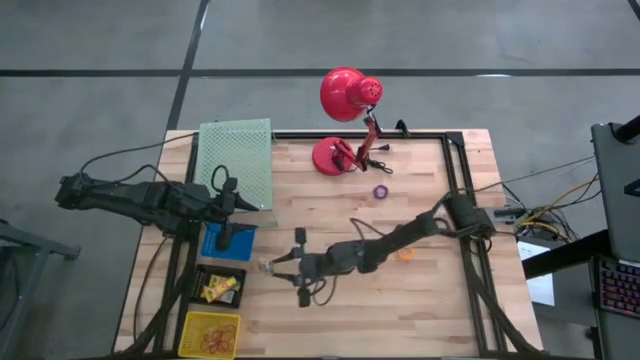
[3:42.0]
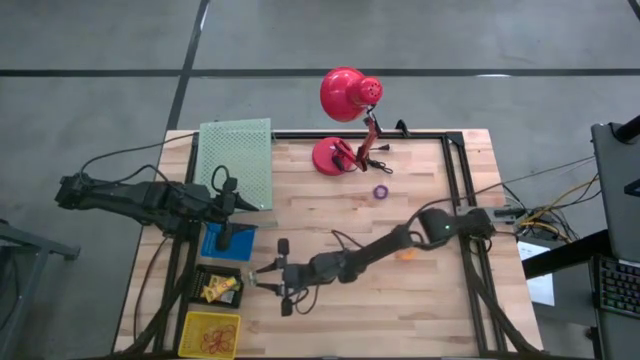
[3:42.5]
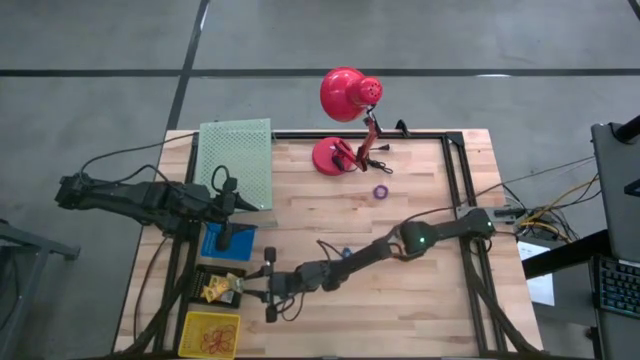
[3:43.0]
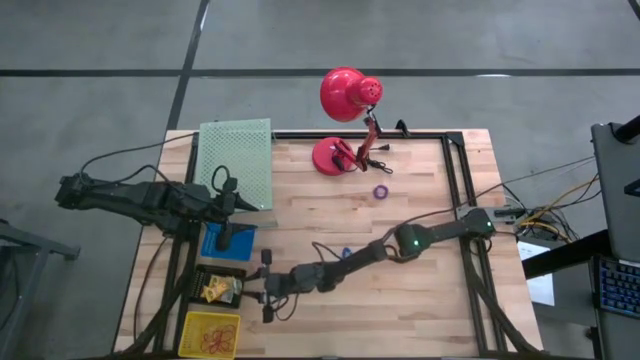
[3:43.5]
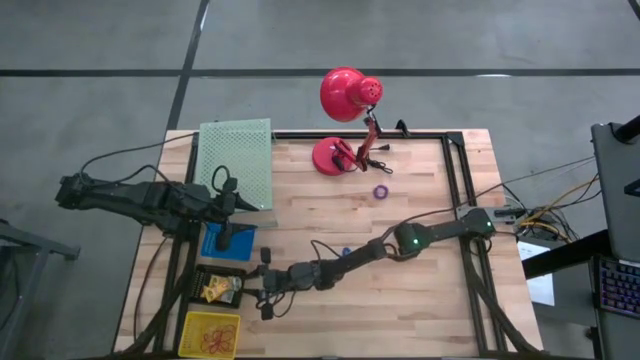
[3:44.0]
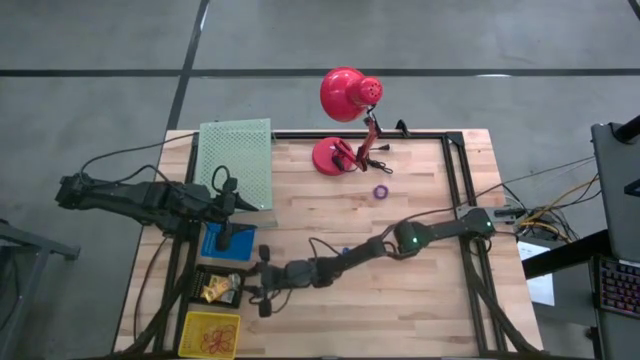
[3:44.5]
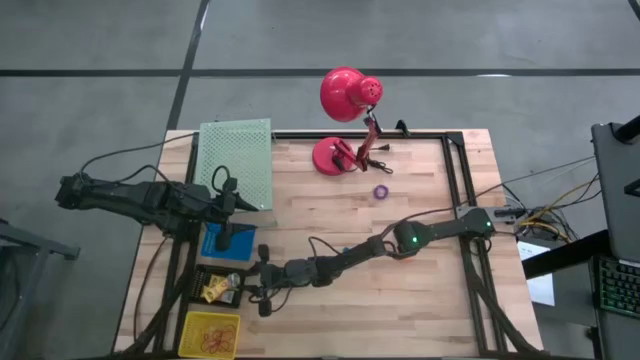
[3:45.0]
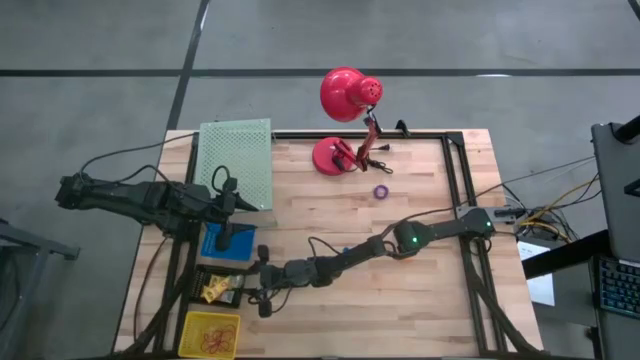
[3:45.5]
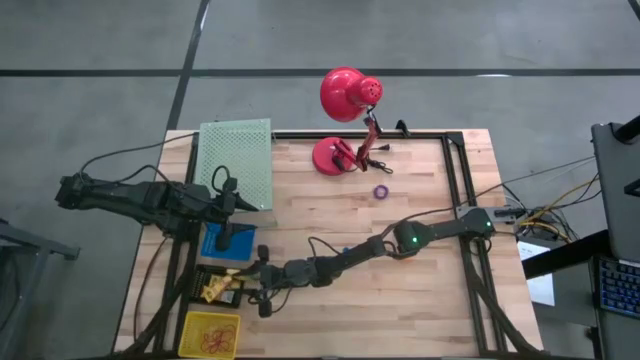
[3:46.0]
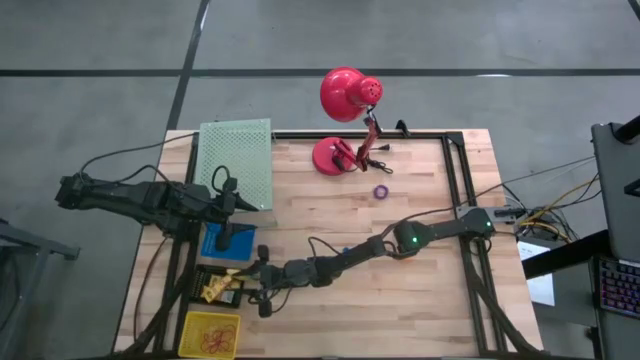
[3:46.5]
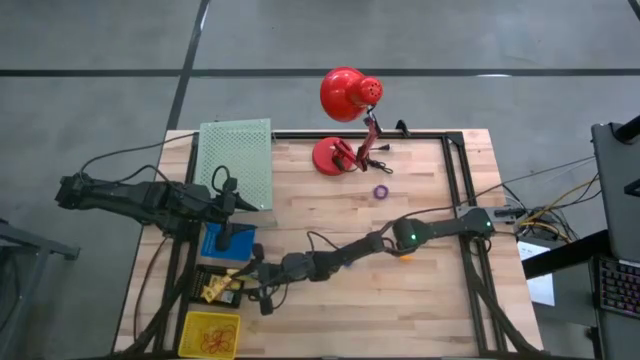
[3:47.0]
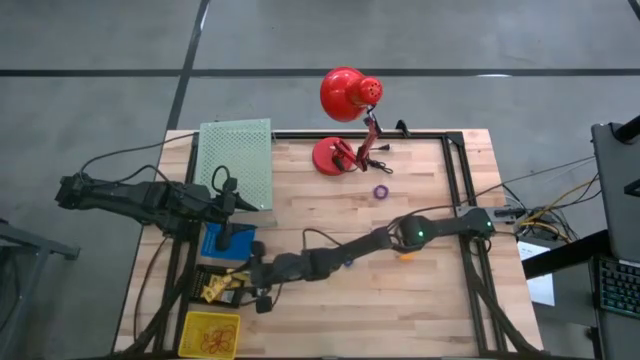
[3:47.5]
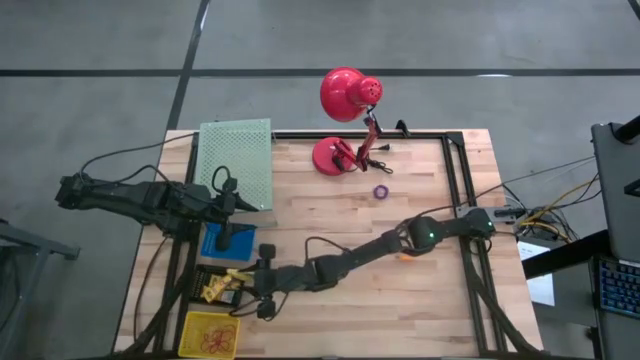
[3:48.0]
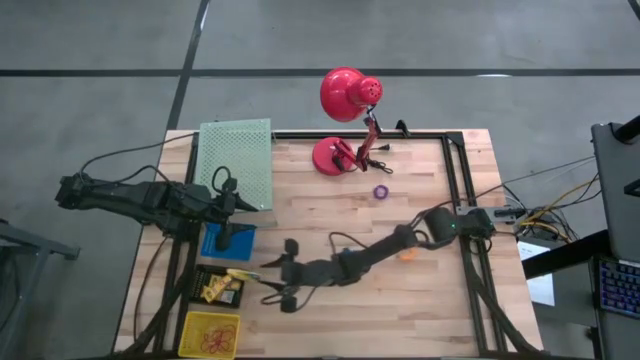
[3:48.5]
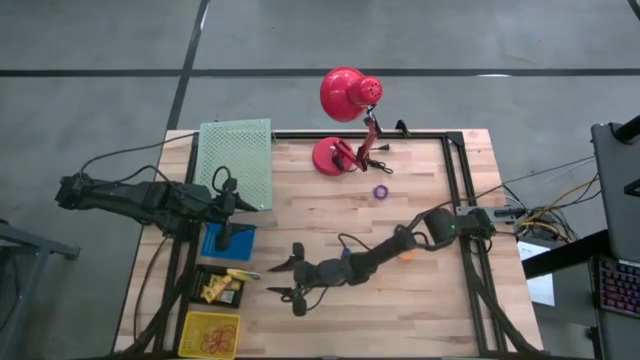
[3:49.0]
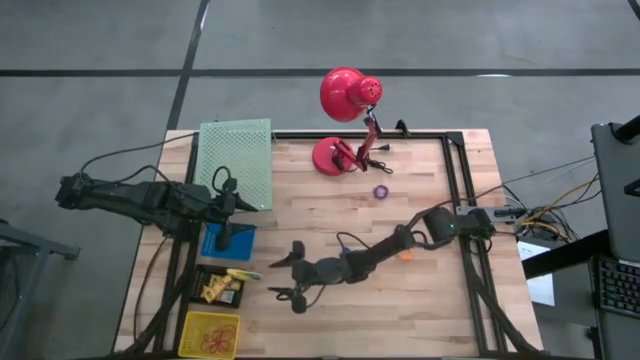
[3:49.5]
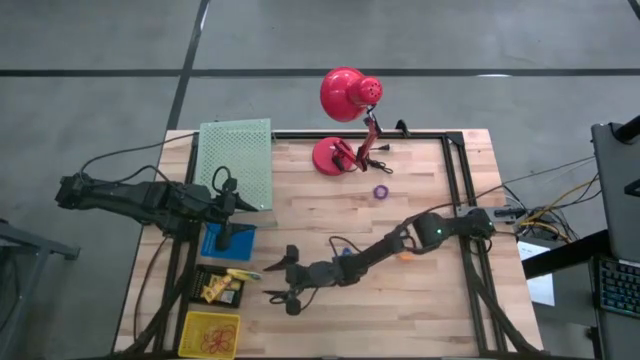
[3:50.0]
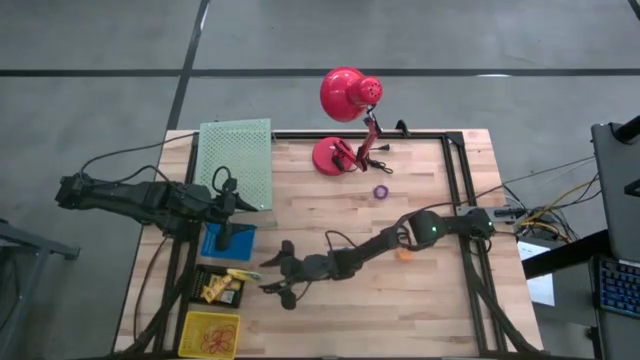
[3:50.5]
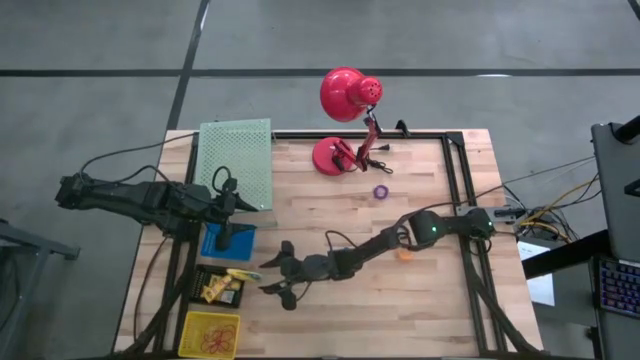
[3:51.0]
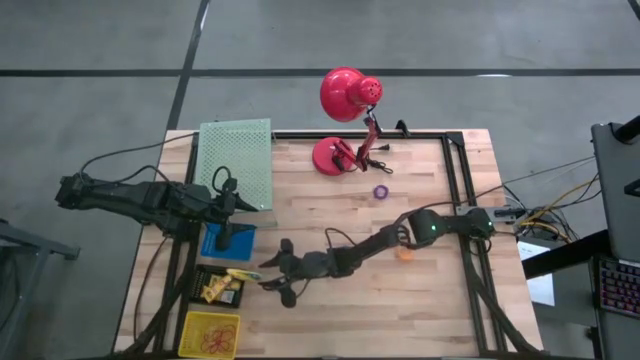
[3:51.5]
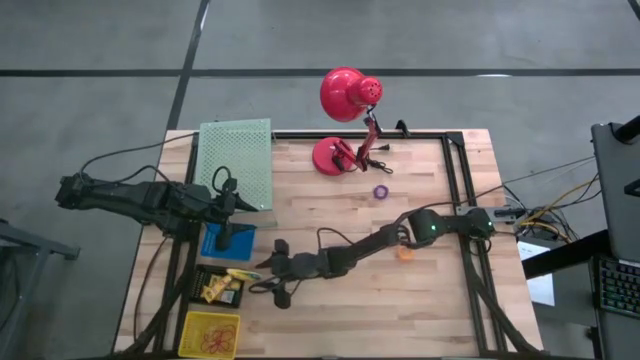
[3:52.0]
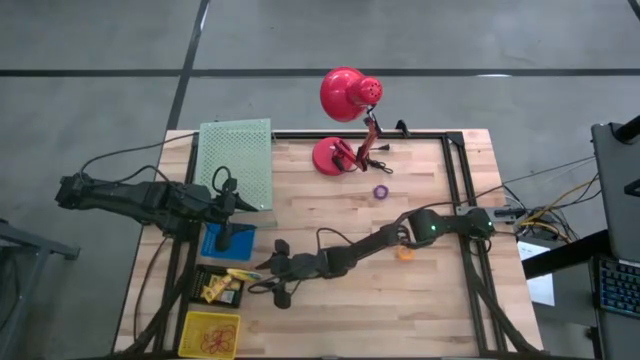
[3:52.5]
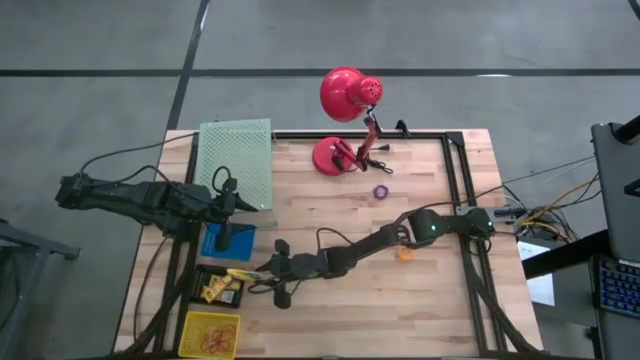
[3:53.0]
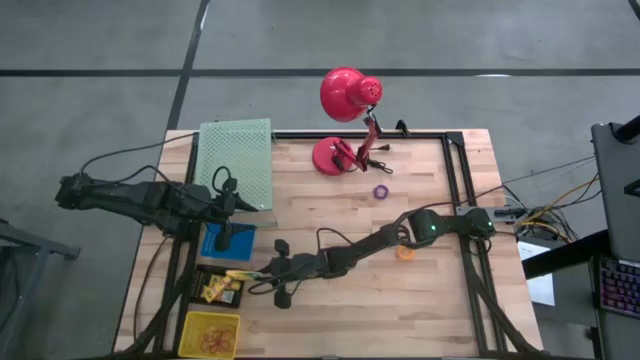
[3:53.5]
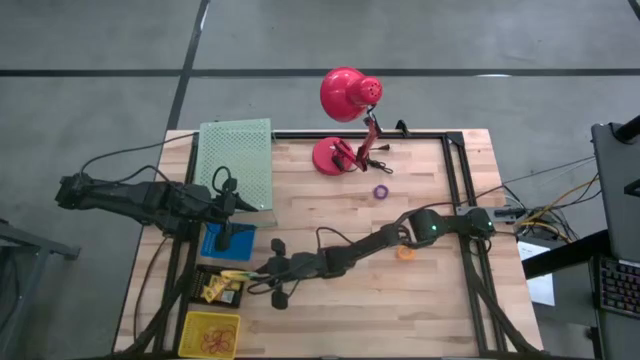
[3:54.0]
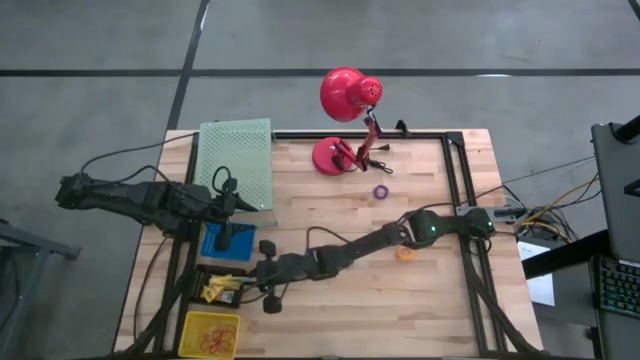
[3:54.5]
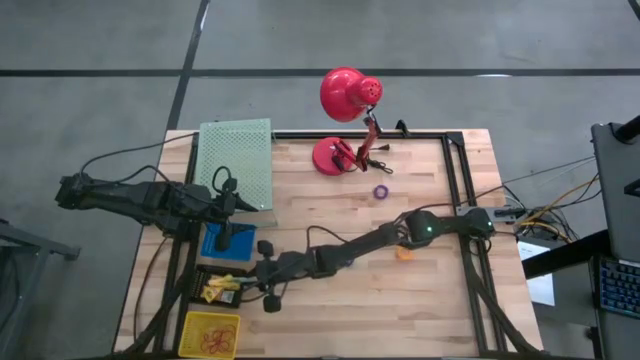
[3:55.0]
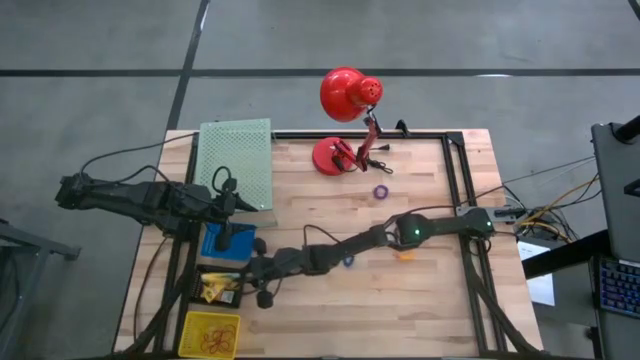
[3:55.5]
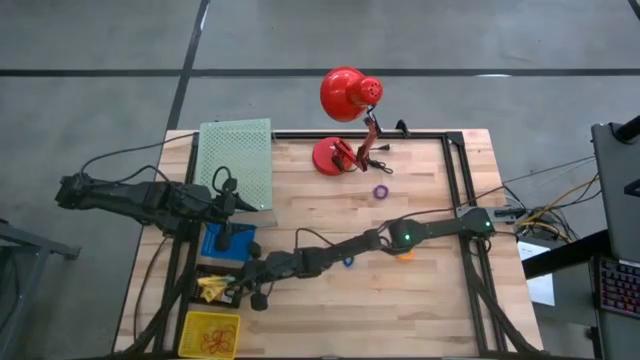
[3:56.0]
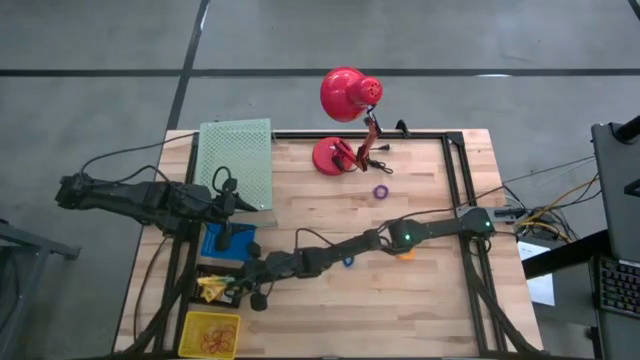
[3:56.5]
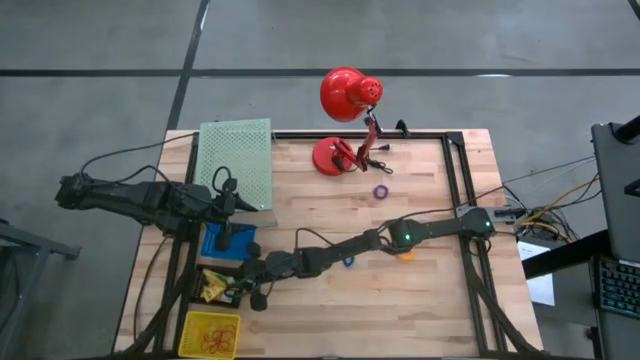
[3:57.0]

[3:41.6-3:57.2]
Task: Pick & Place Office Desk Supplies
Put the crayons box into the black bin

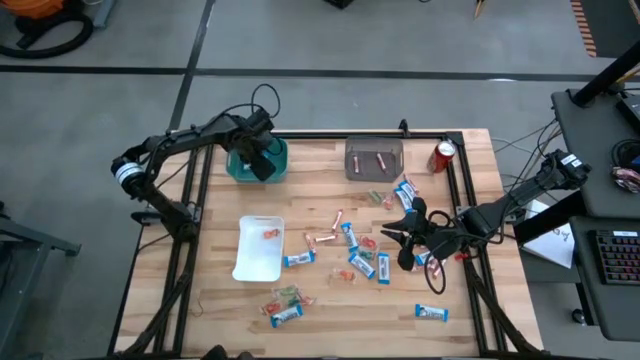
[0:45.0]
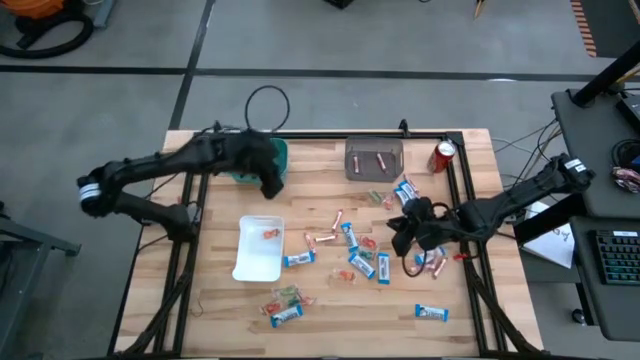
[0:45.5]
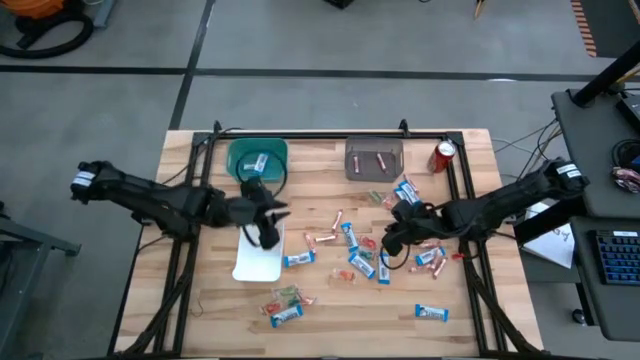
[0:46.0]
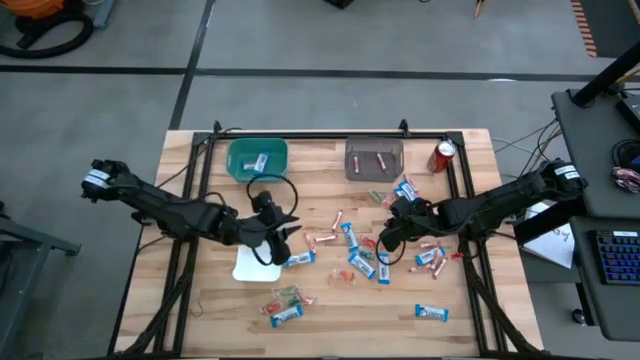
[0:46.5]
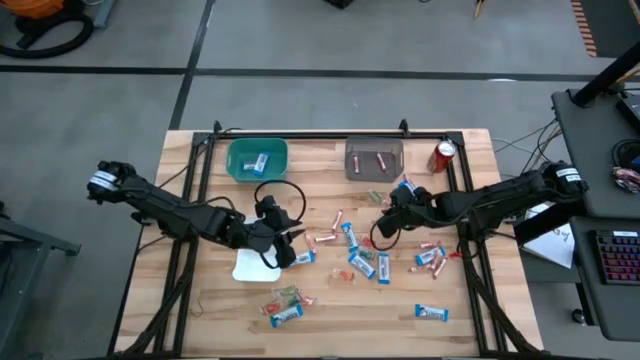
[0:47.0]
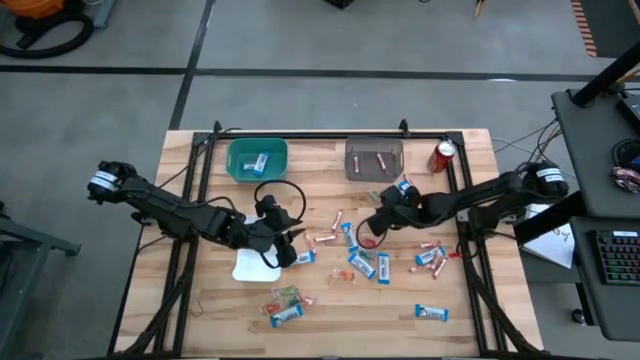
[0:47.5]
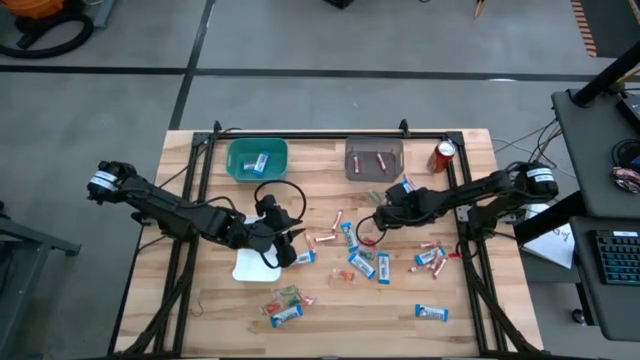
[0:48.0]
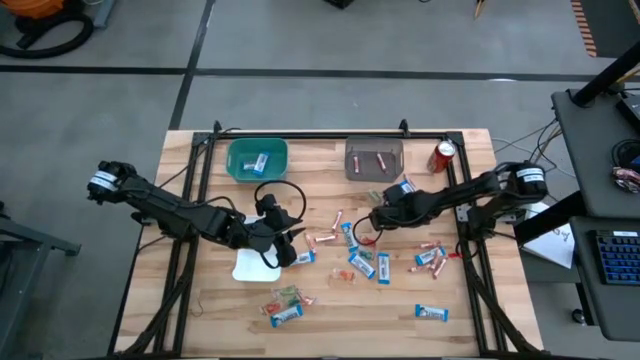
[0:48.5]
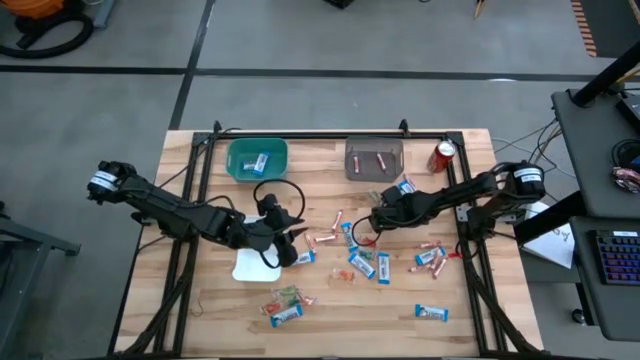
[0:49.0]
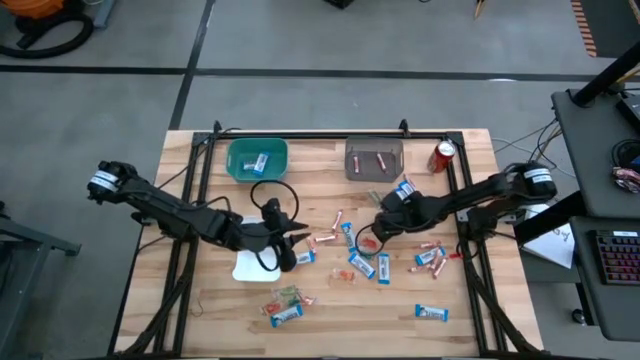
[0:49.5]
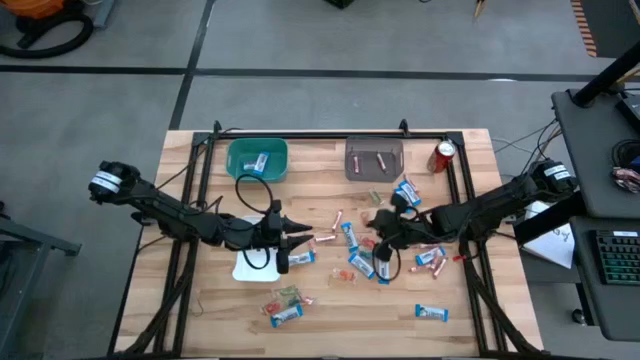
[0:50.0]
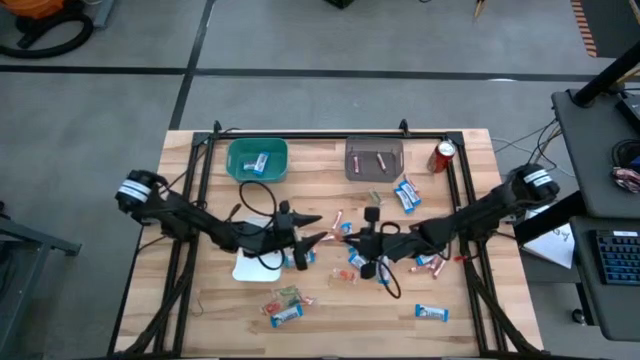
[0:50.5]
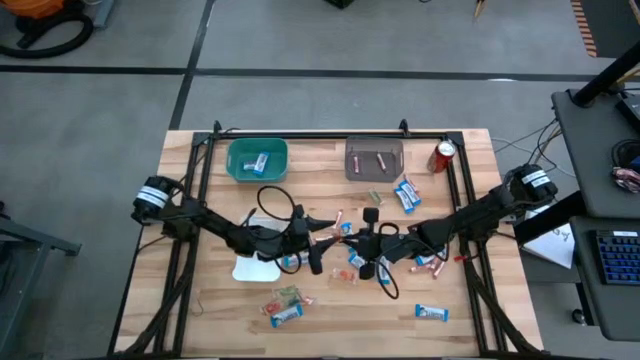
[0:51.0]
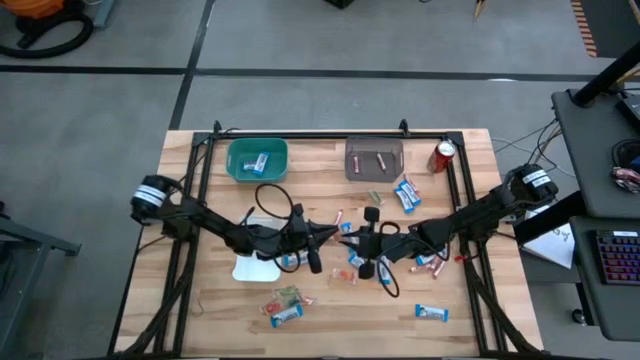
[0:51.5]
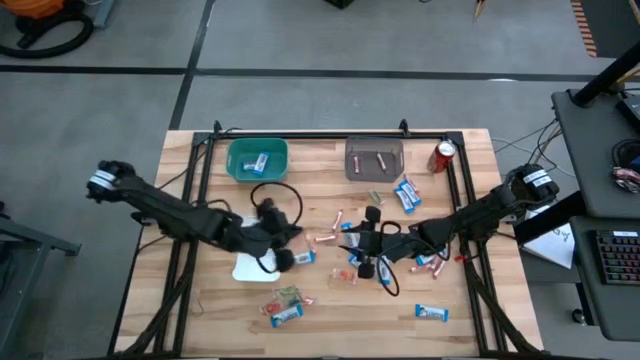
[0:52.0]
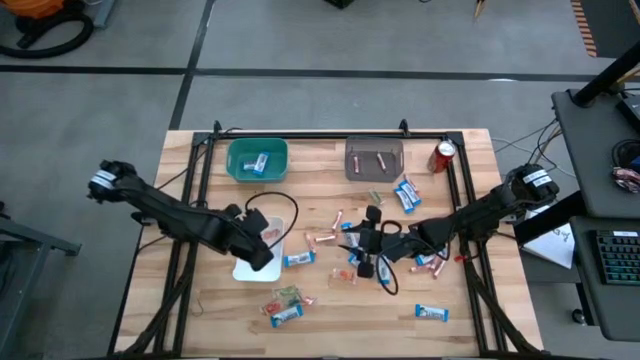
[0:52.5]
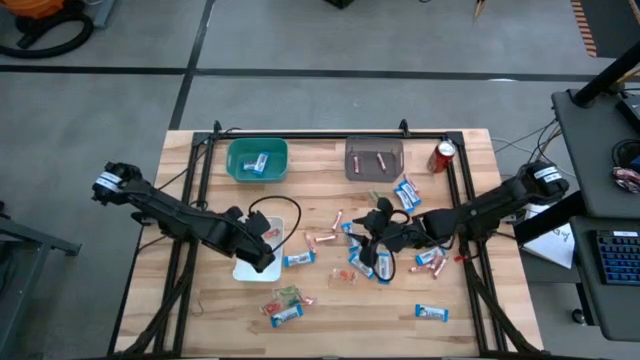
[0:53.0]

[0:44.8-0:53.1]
Task: Sort candy
Put the orange gummy candy into the white bin
